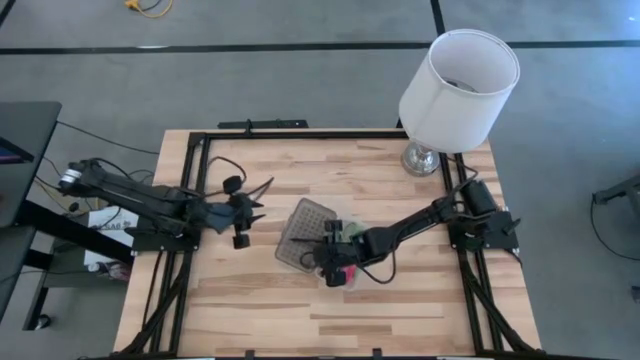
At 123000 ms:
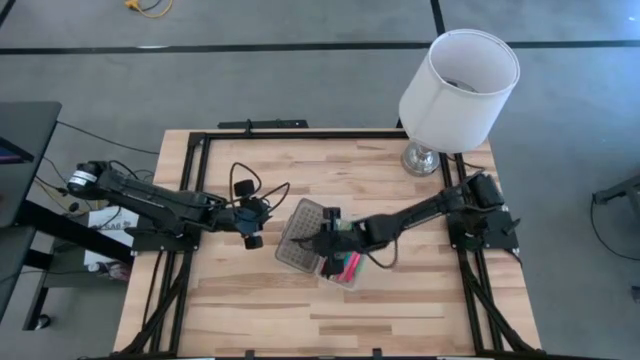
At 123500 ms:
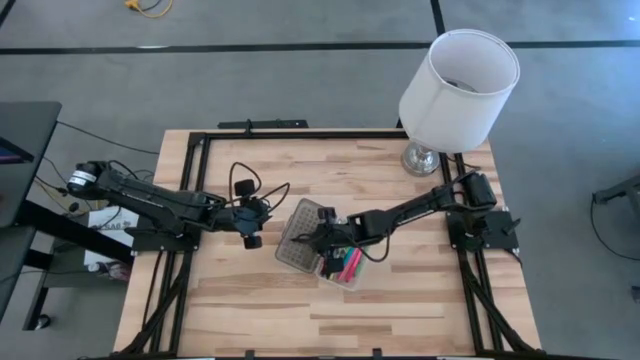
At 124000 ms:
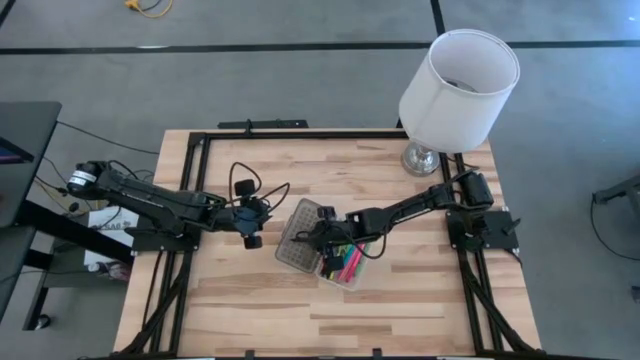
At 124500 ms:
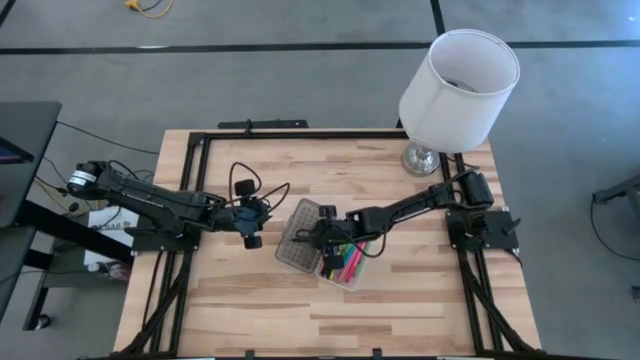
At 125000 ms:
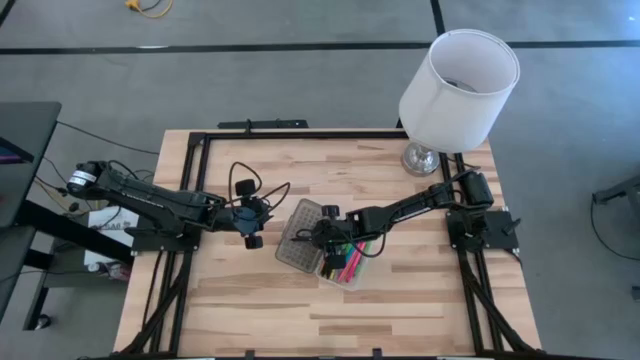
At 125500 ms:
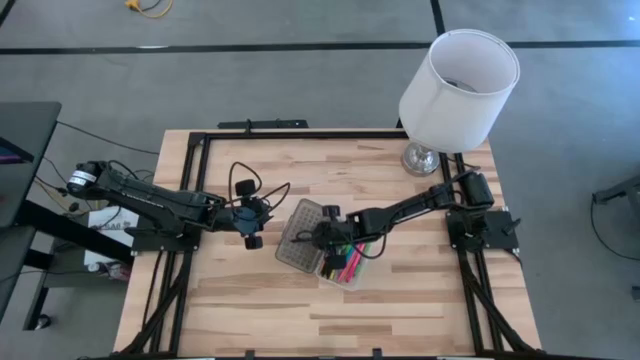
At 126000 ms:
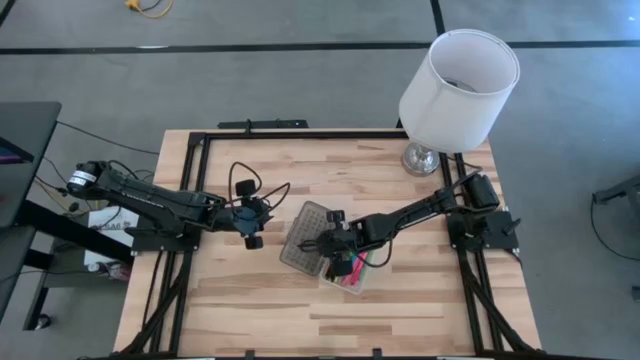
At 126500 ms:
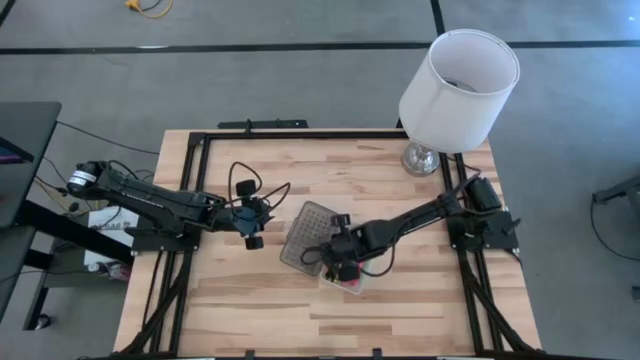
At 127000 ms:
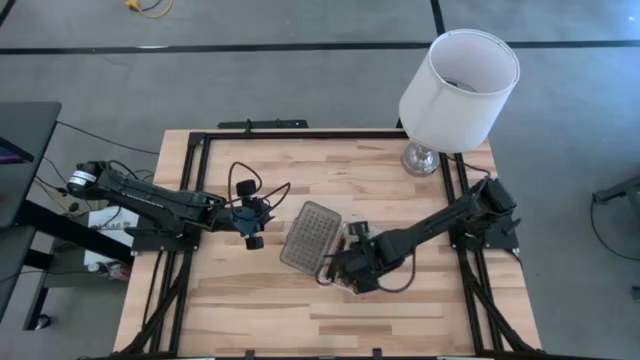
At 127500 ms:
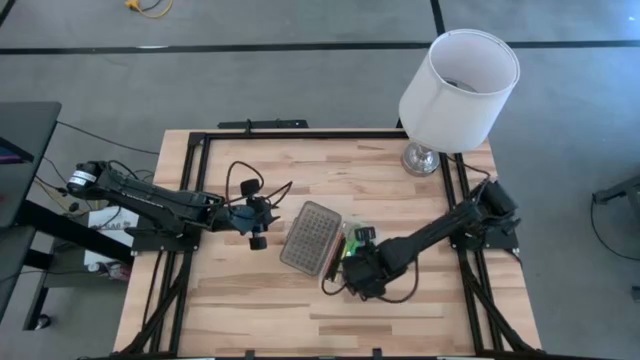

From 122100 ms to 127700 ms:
Task: Pick & place school supplies into a supply box
Adjust the black pen in the black supply box

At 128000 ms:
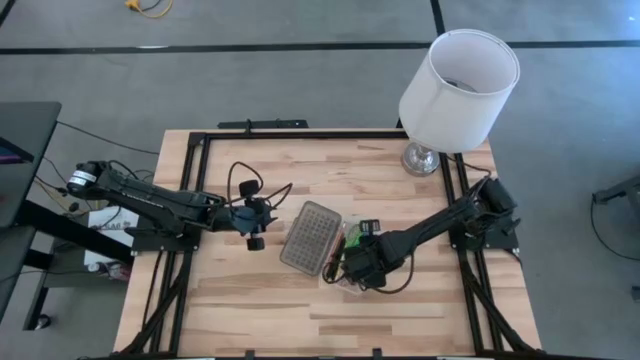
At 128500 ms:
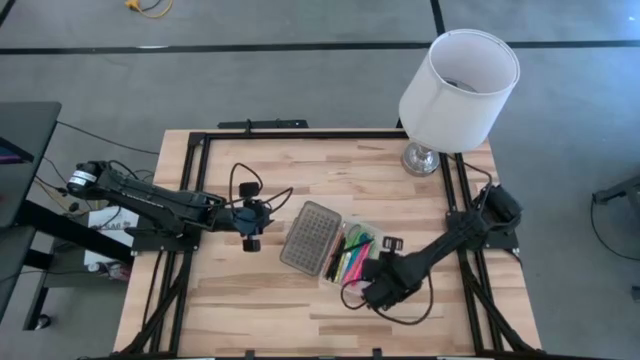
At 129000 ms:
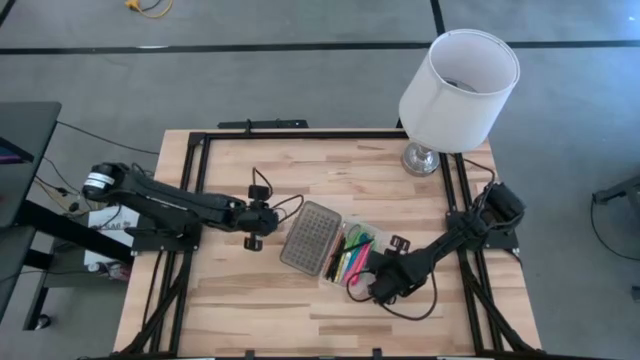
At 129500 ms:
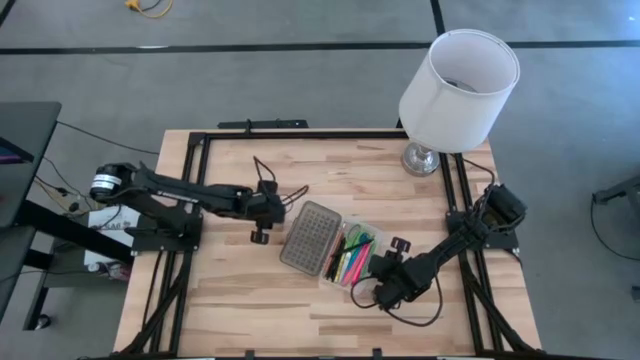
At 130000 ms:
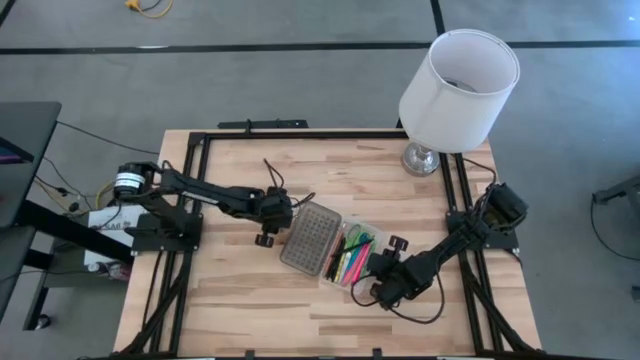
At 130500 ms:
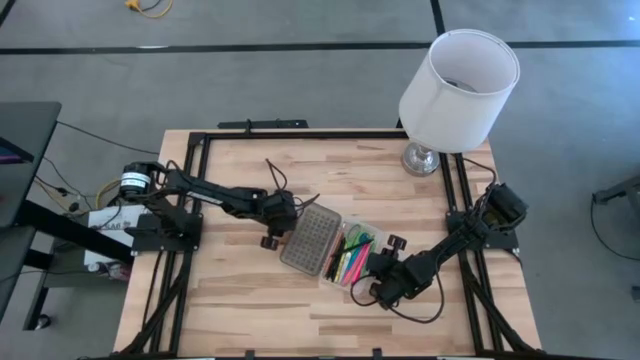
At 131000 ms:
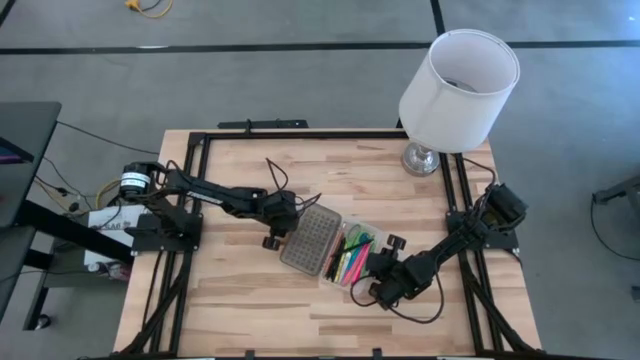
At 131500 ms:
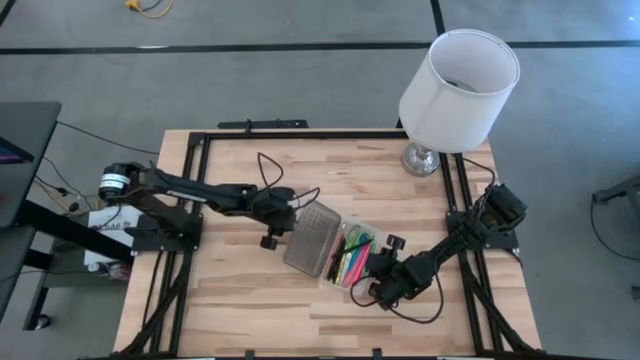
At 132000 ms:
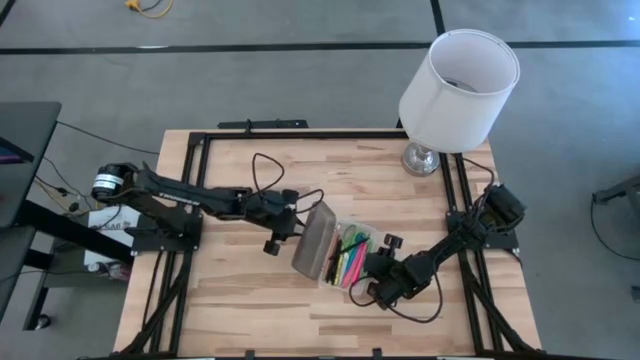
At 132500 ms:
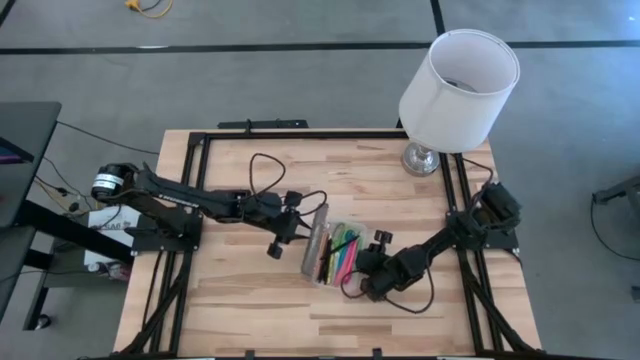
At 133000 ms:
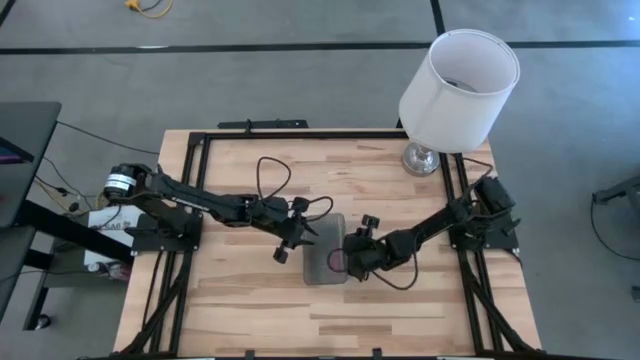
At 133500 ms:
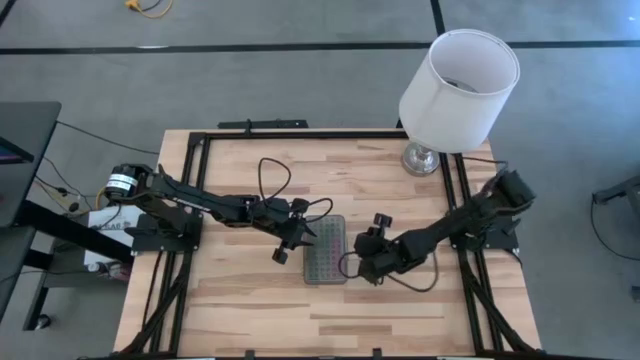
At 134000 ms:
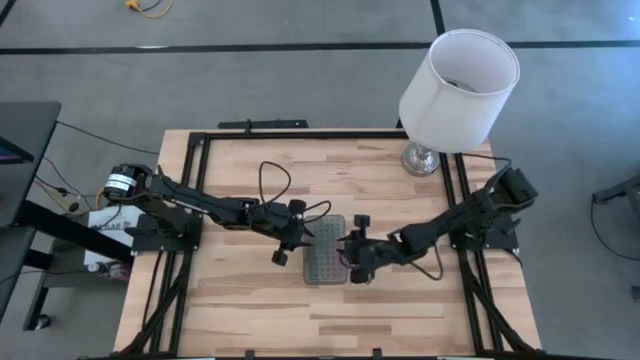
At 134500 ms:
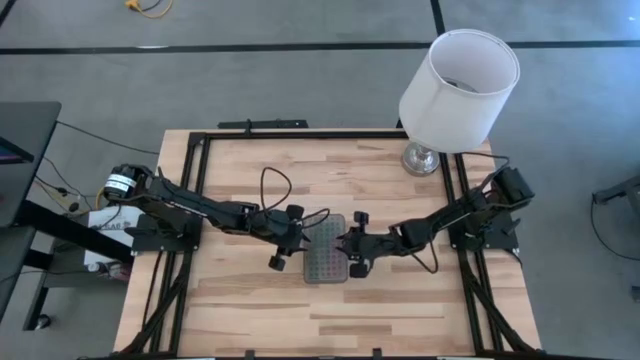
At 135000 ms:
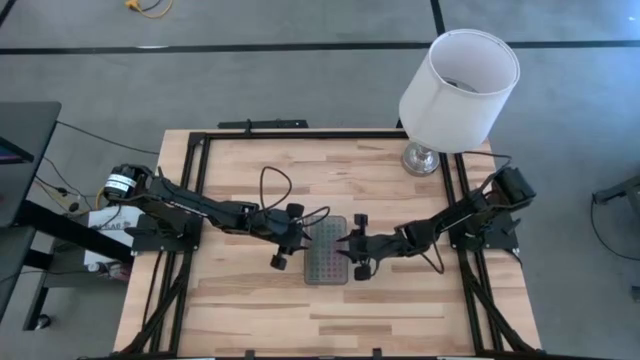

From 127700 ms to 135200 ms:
Close the black supply box

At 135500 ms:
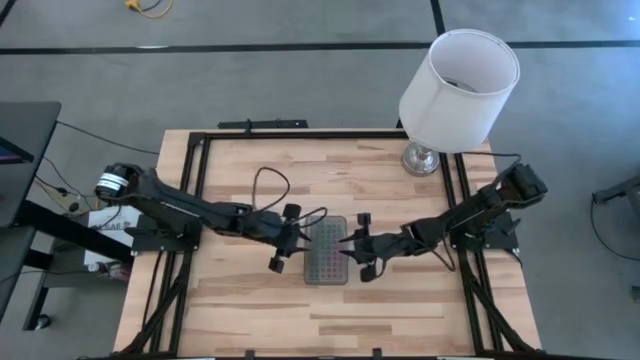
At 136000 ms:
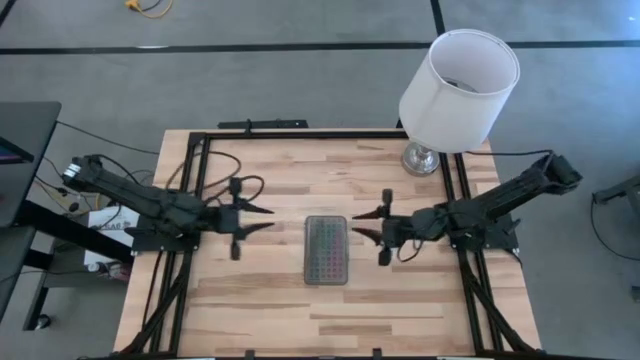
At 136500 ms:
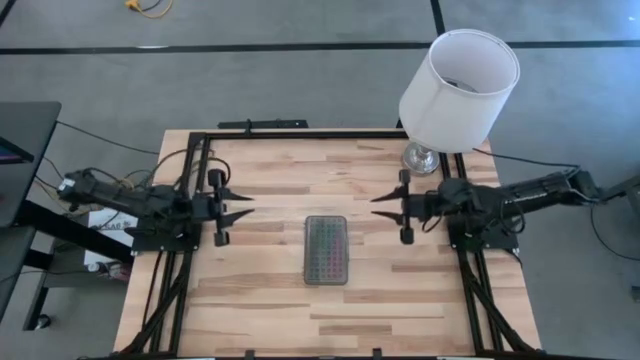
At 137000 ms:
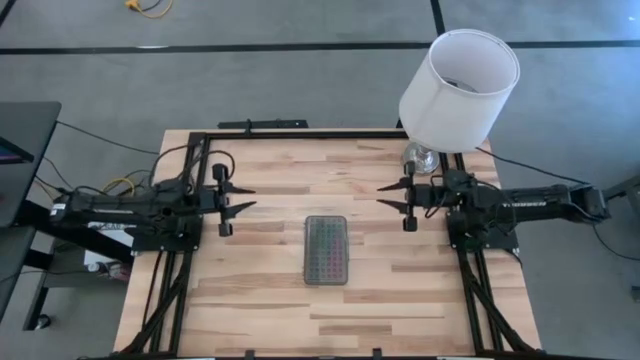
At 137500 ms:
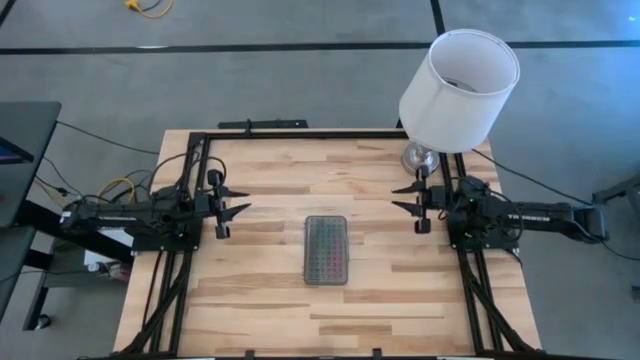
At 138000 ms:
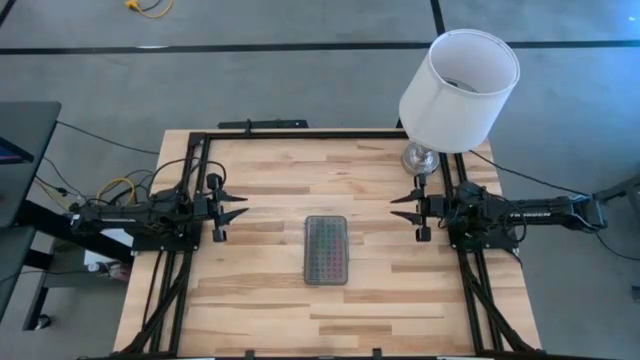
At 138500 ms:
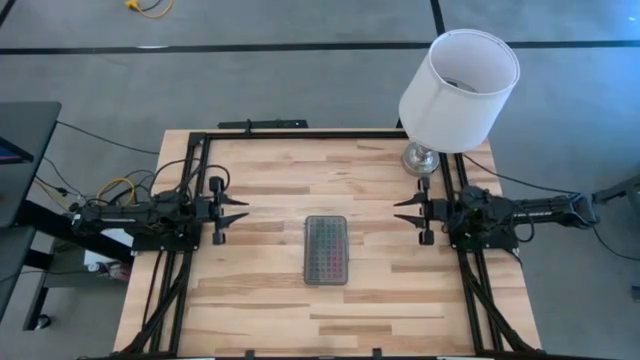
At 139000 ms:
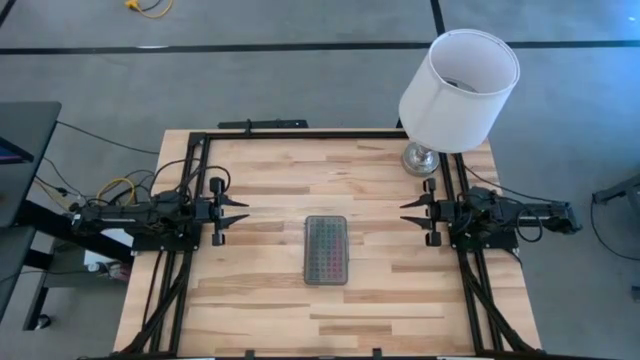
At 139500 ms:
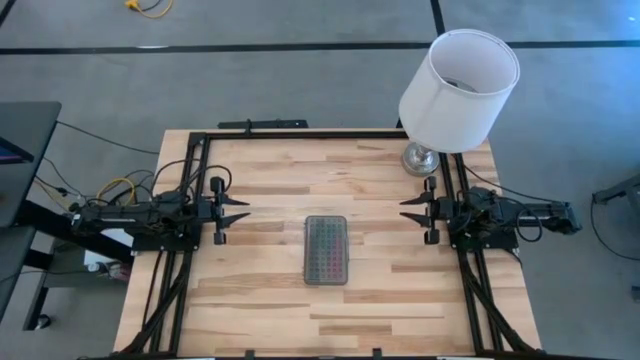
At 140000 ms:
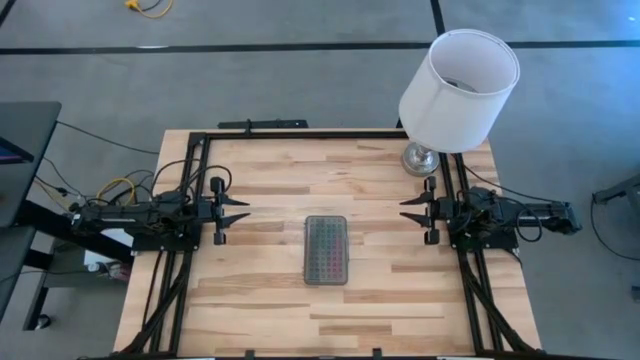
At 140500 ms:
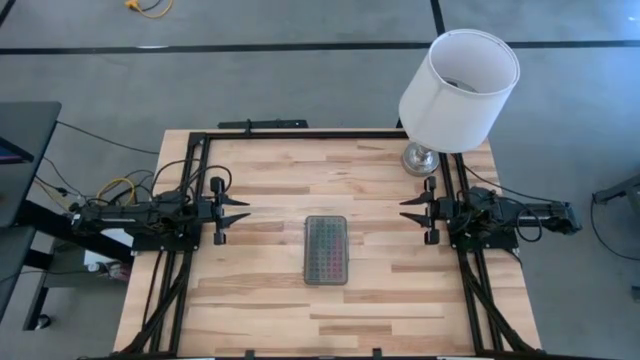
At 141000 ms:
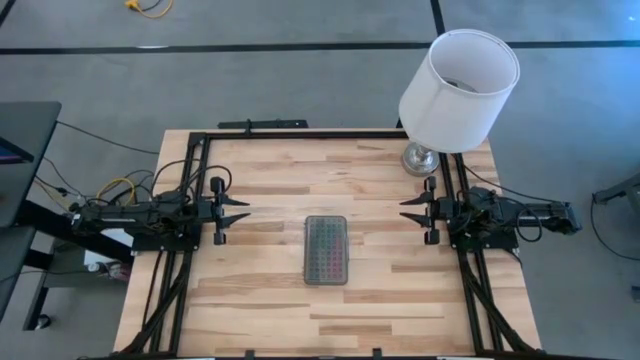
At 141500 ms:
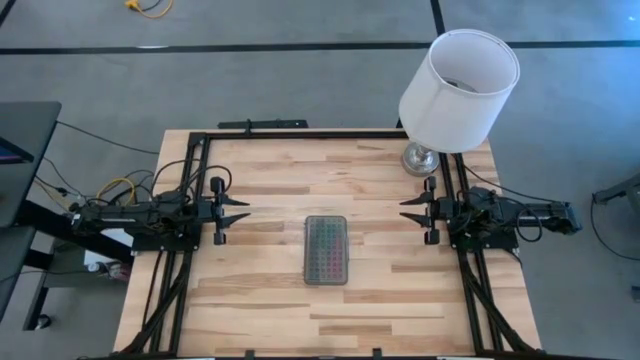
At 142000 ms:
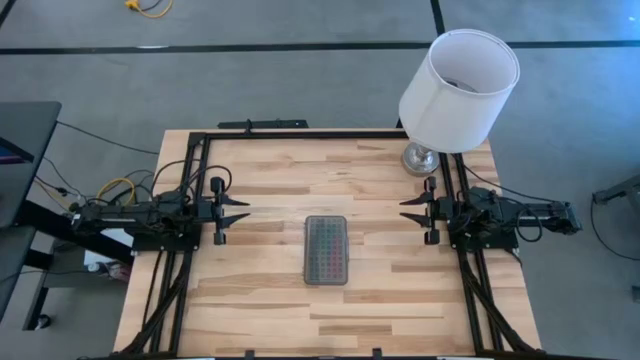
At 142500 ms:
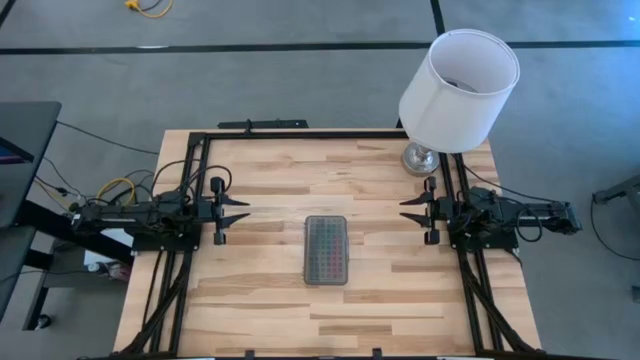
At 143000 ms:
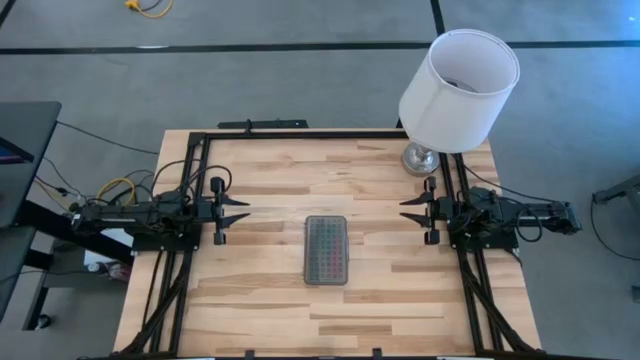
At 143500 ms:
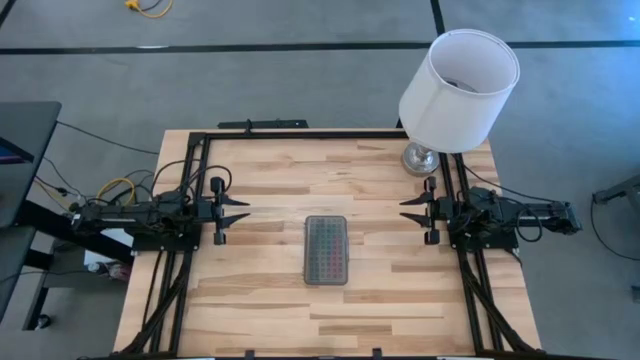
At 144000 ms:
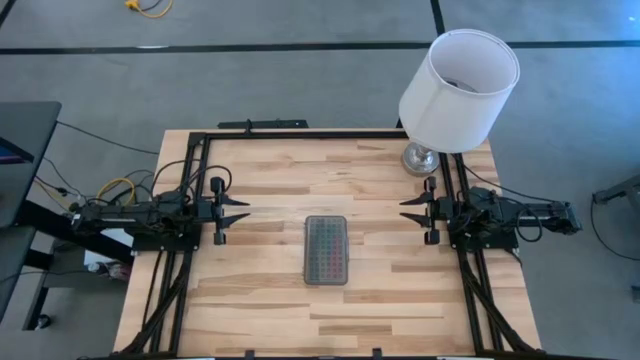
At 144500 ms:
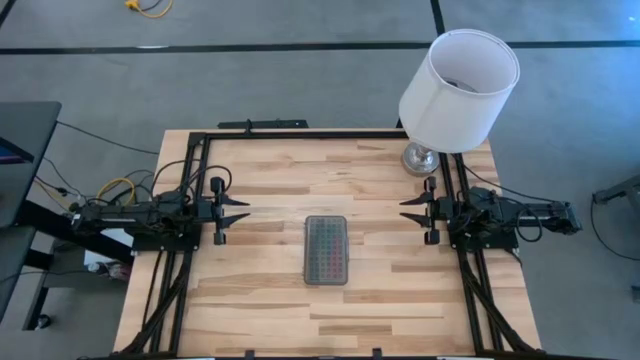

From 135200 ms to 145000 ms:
Return to Home Position
